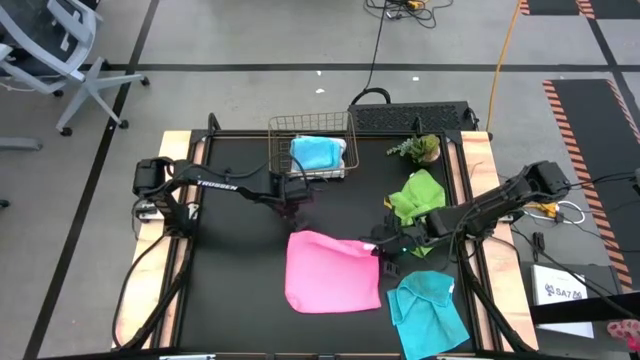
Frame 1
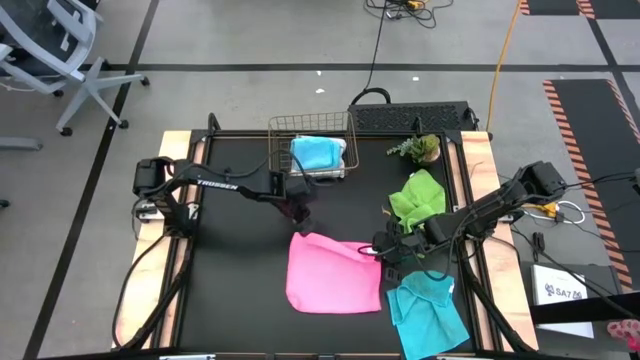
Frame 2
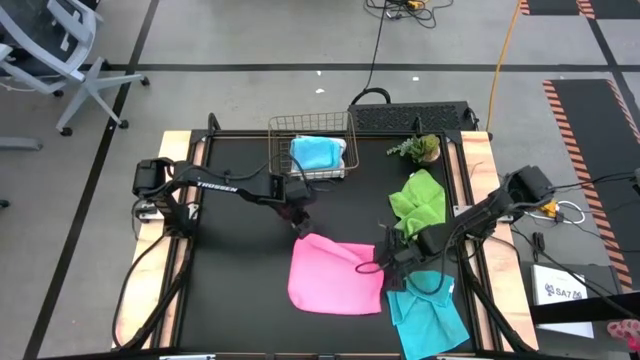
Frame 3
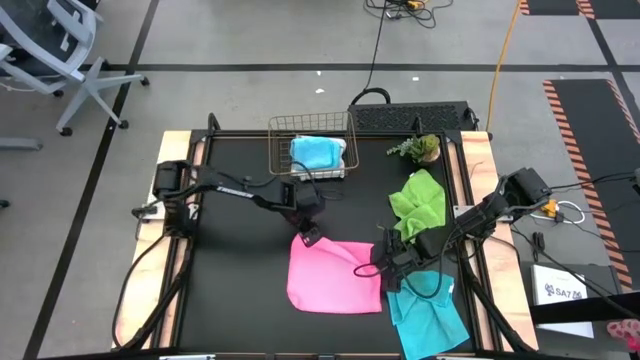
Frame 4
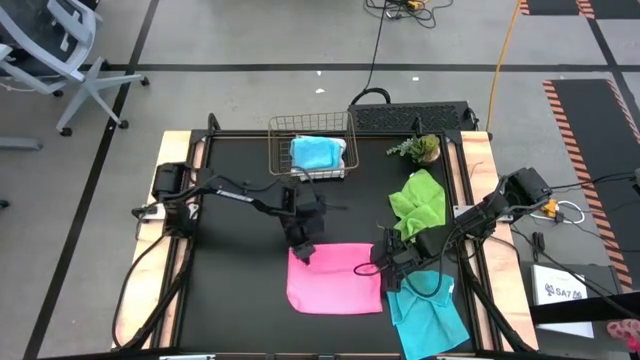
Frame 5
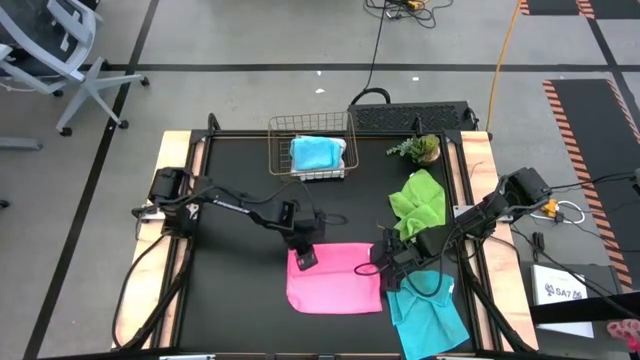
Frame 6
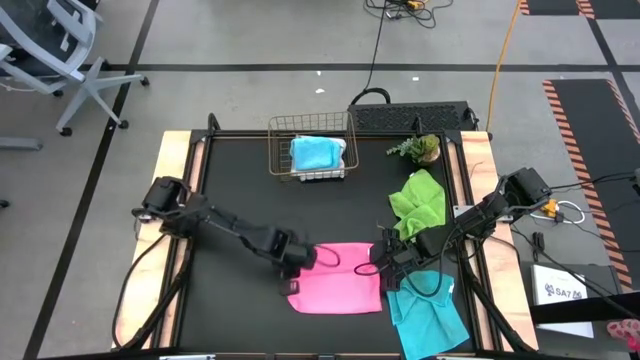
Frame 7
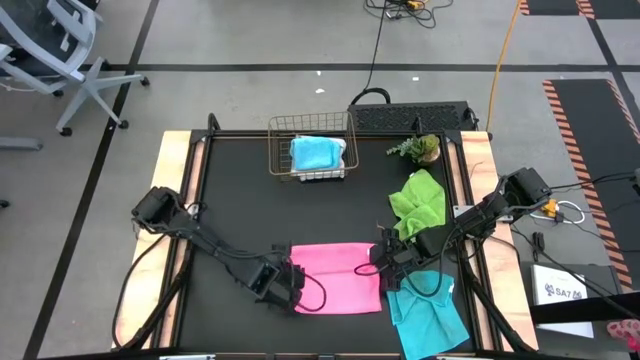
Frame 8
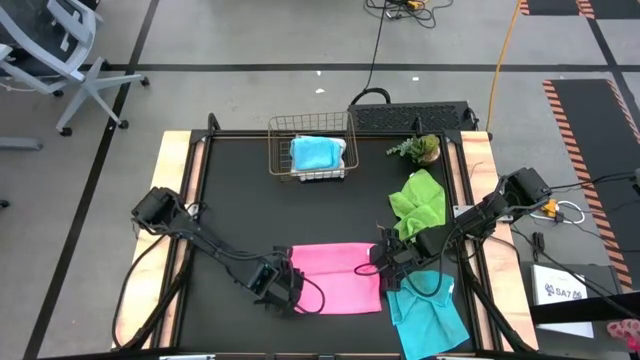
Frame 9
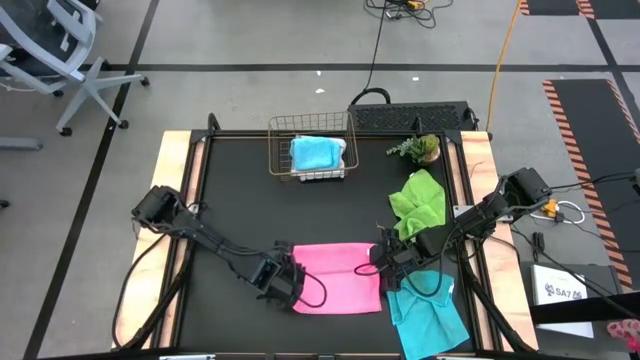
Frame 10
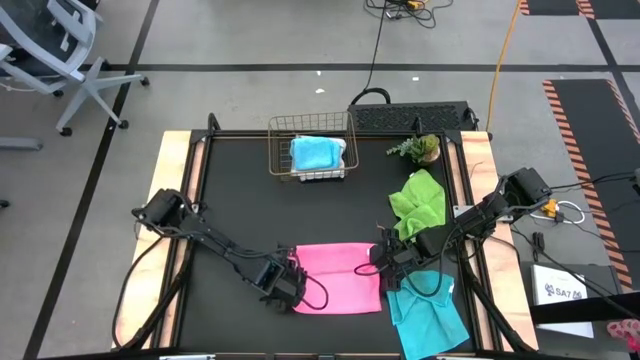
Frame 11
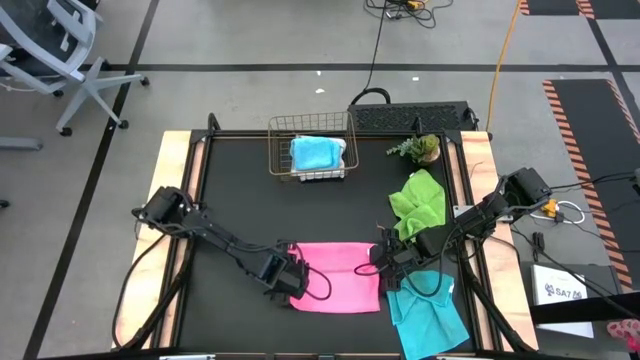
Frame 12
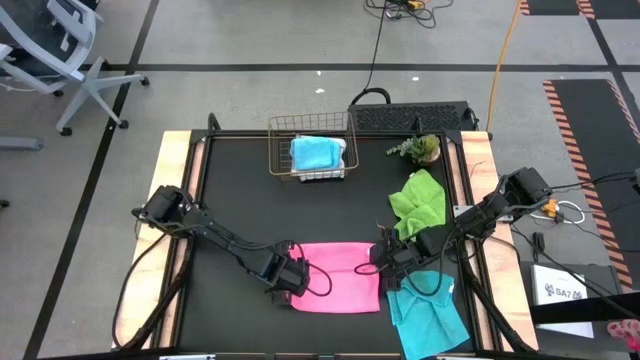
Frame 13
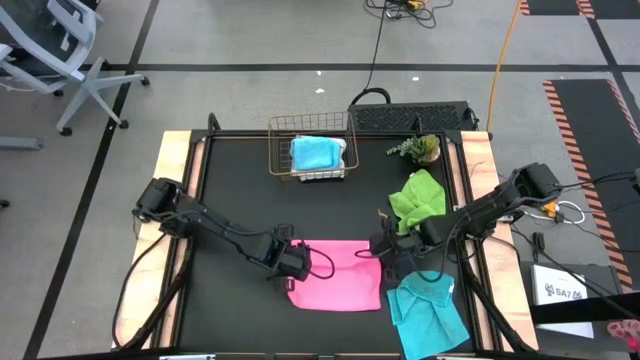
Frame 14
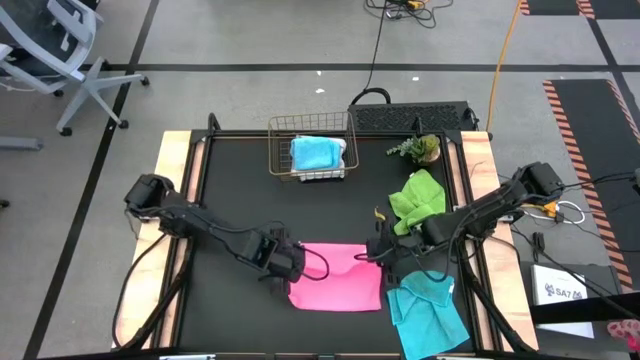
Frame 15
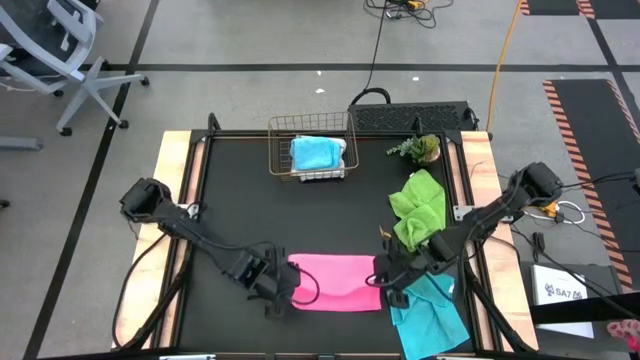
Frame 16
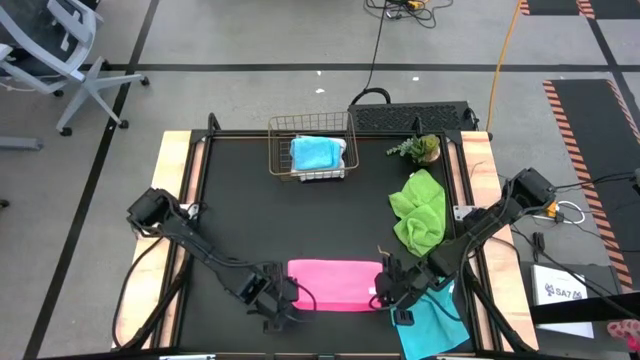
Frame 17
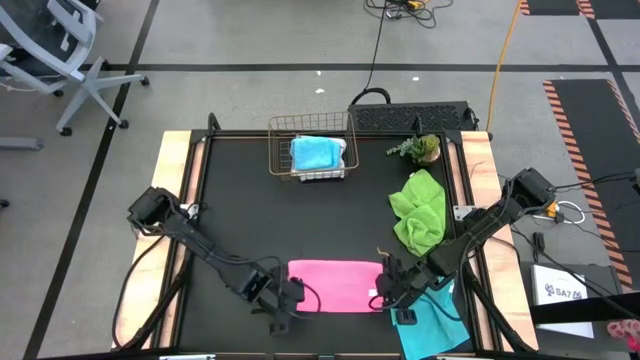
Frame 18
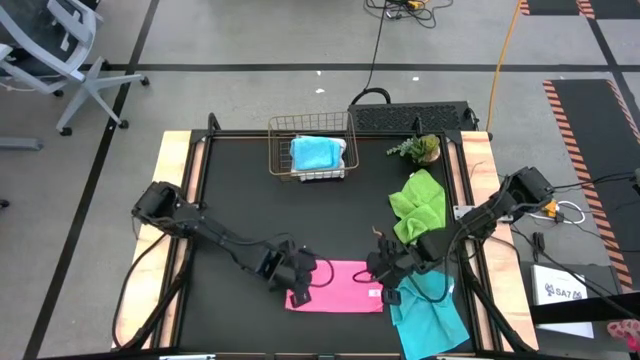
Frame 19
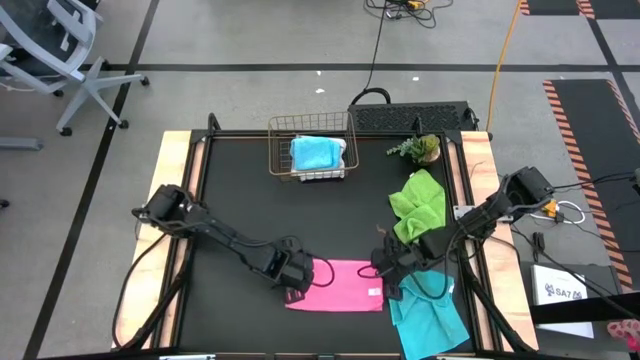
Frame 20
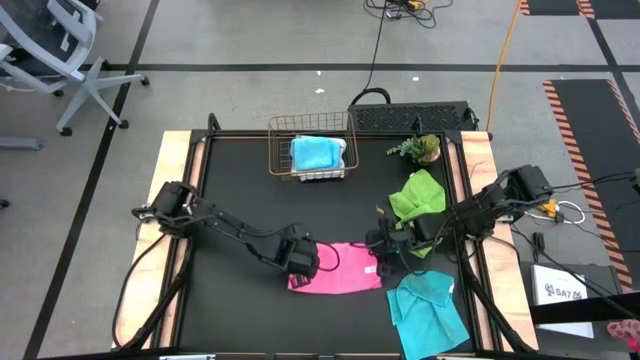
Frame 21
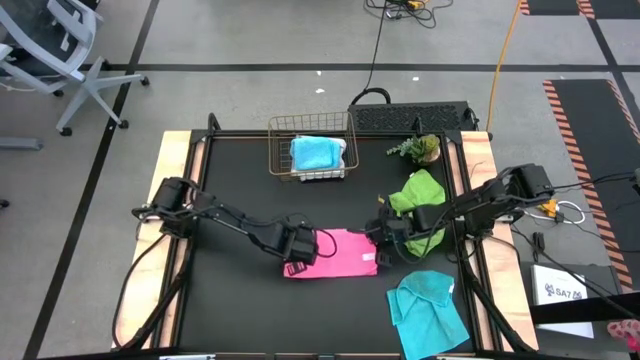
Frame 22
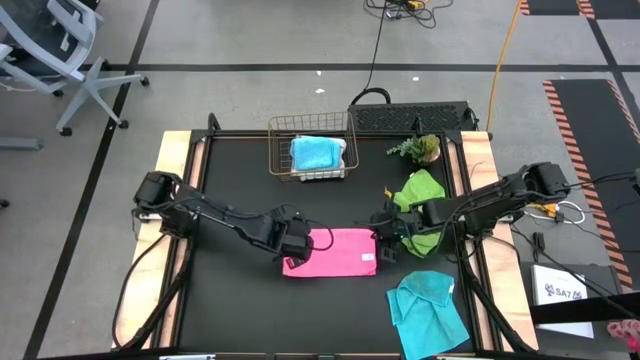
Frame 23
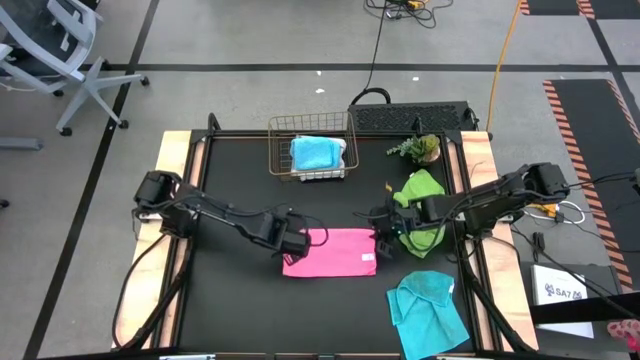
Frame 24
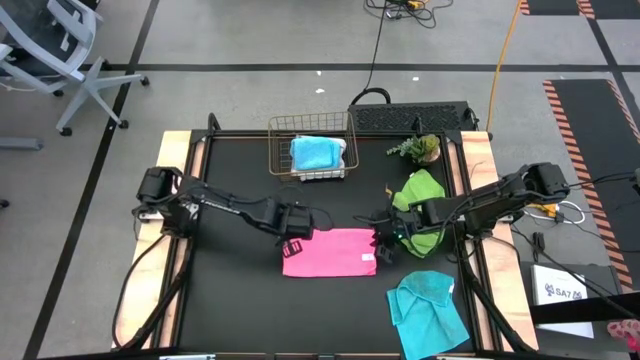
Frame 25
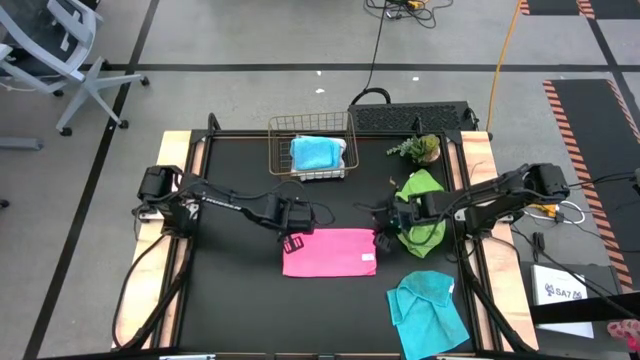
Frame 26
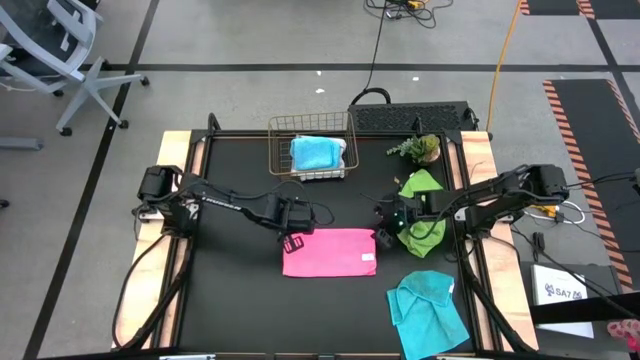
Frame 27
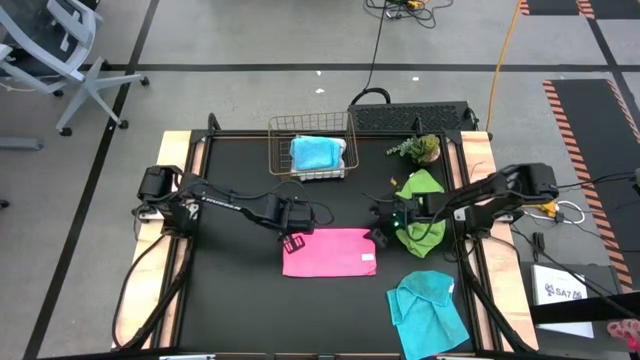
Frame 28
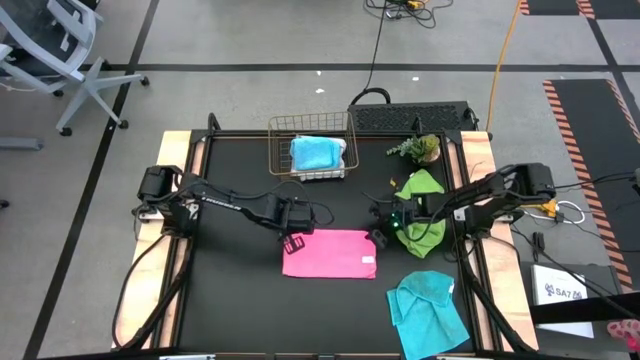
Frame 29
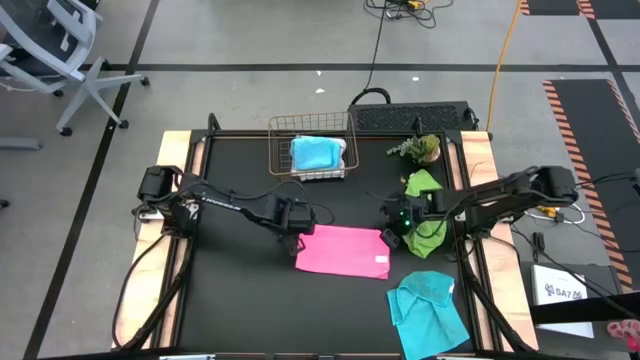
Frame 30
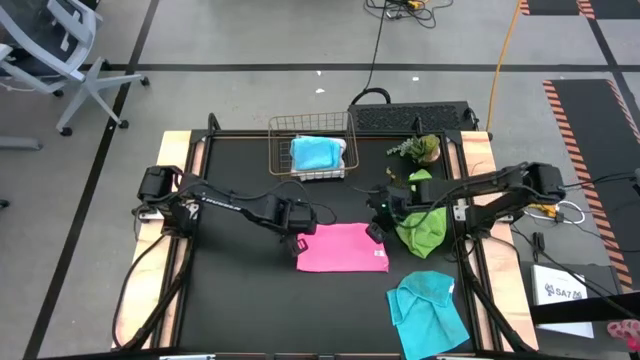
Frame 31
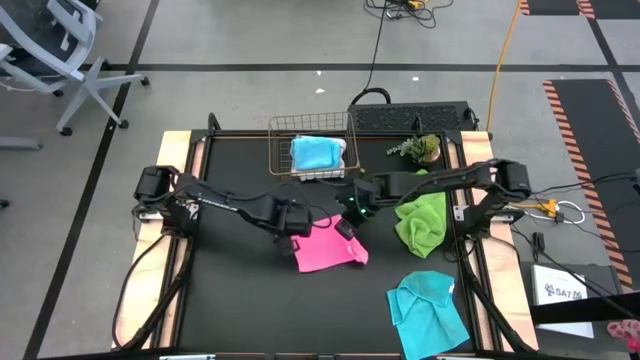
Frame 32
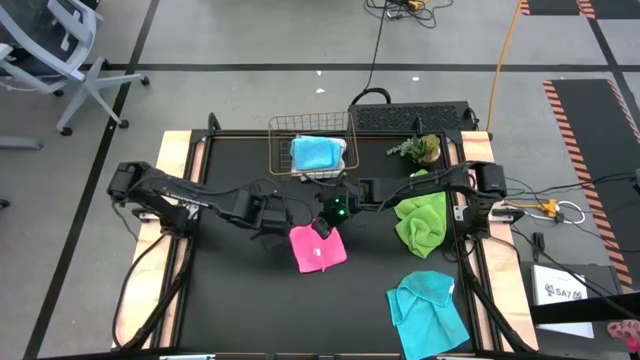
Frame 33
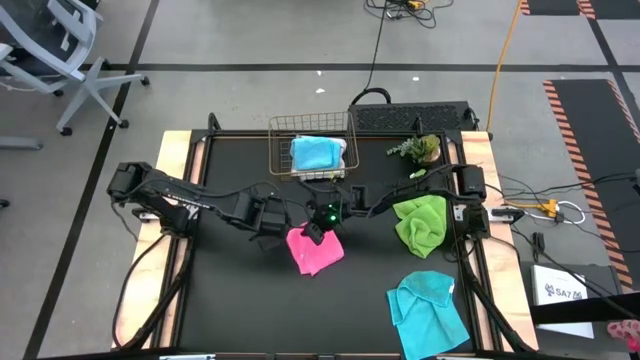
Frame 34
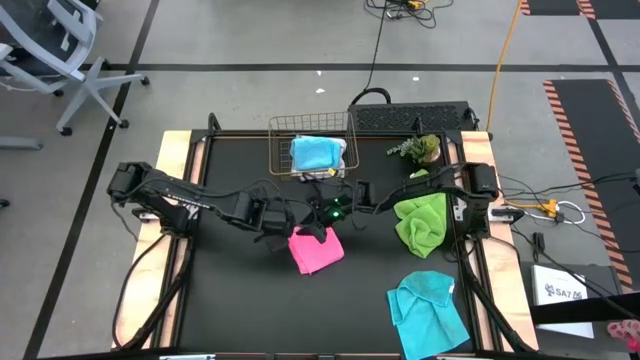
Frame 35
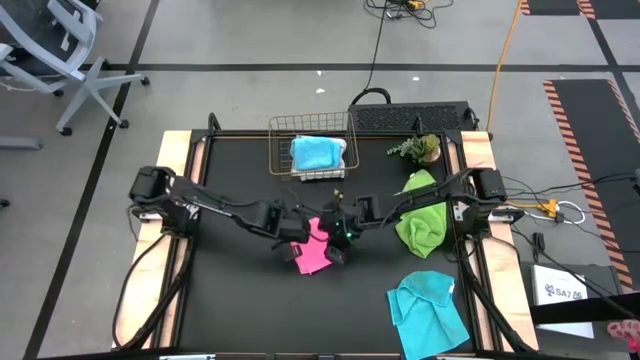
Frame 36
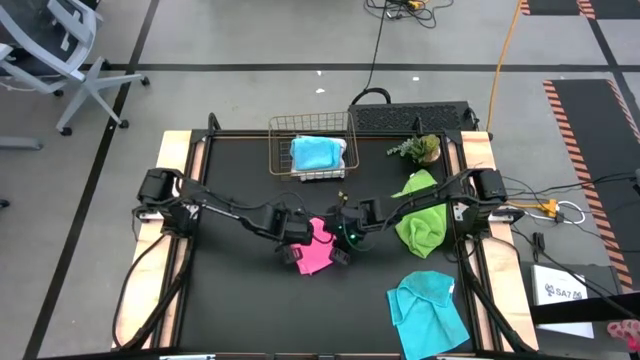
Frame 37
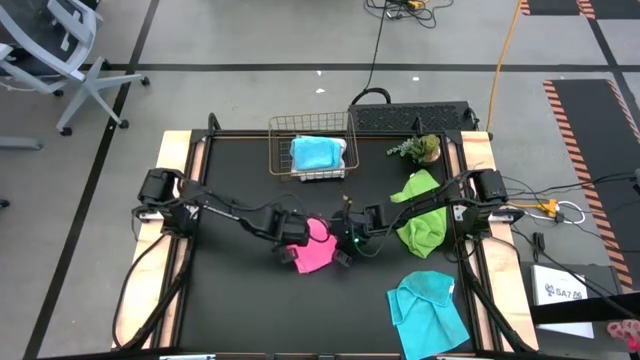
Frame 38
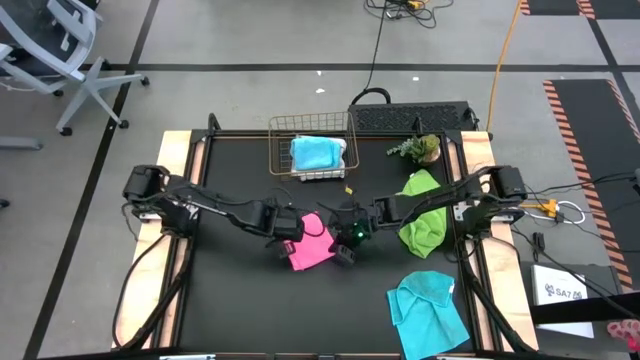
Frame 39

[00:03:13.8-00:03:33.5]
Task: Fold microfiber towels
Fold the pink microfiber cloth
